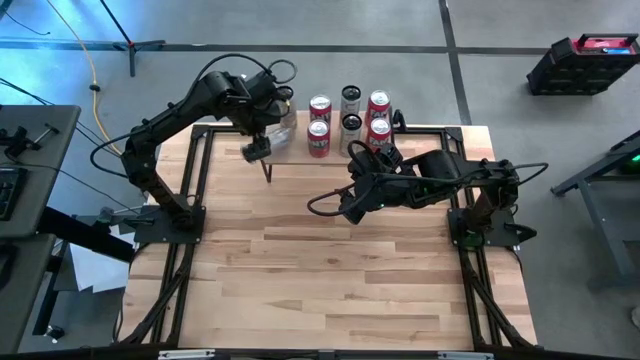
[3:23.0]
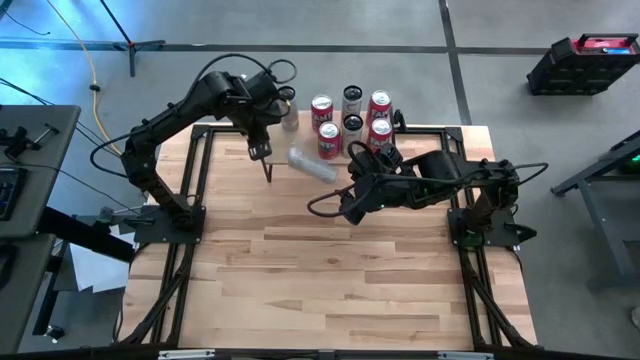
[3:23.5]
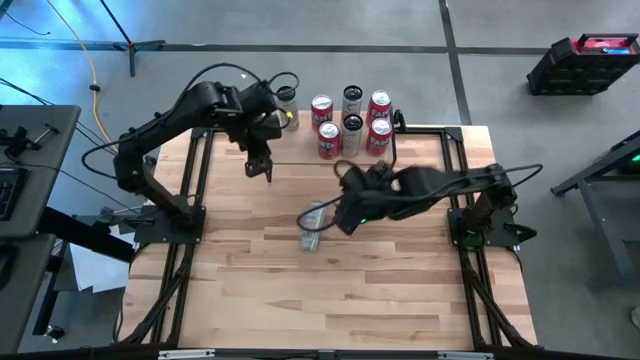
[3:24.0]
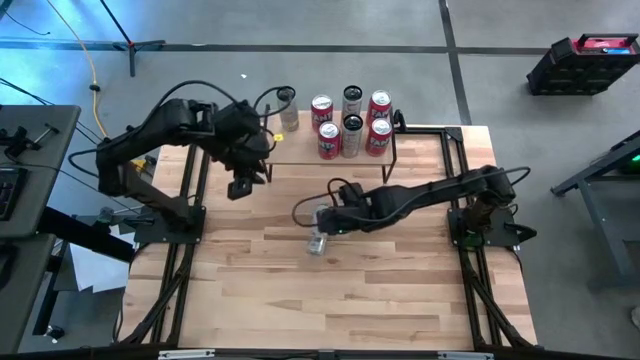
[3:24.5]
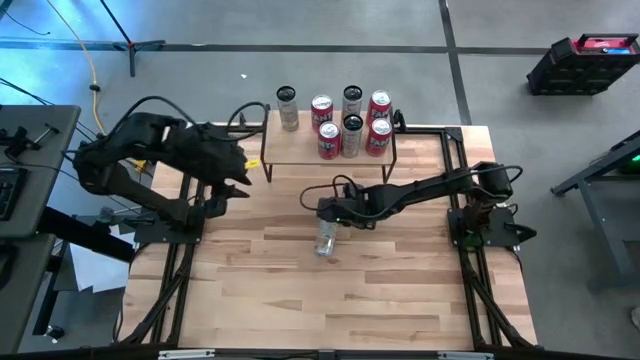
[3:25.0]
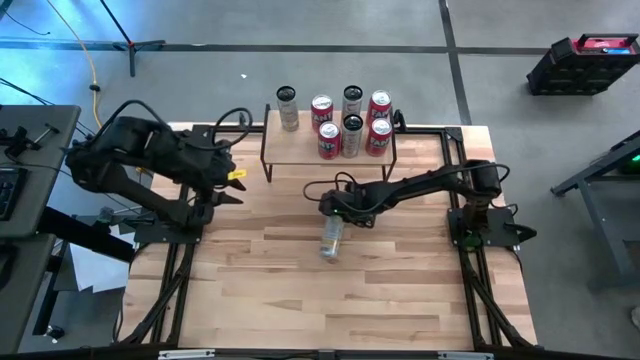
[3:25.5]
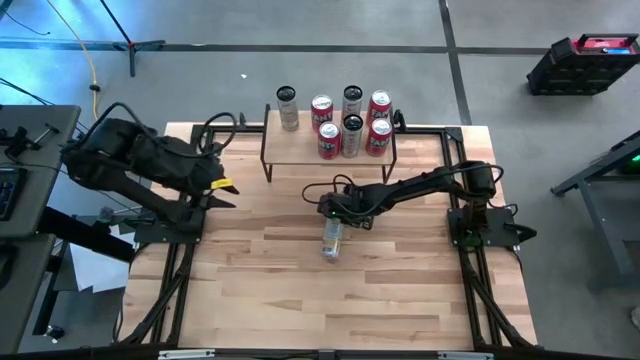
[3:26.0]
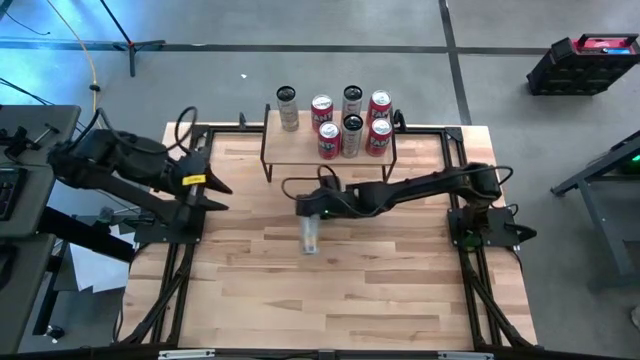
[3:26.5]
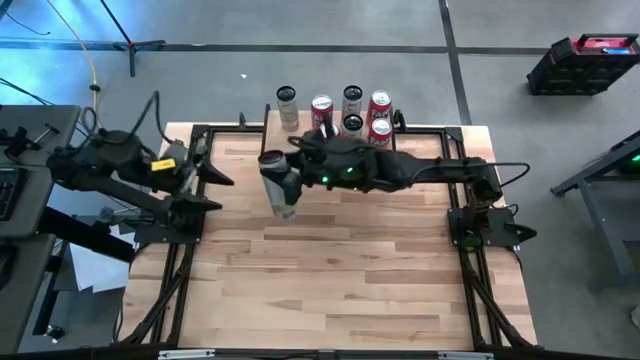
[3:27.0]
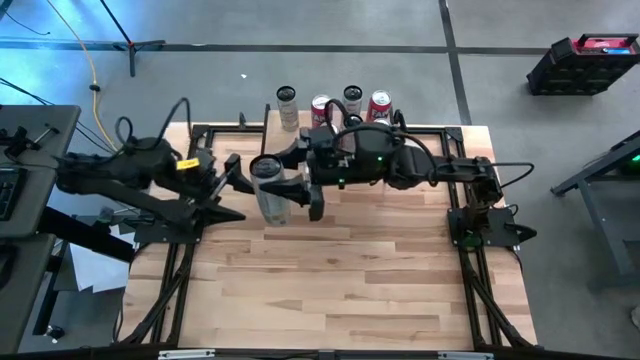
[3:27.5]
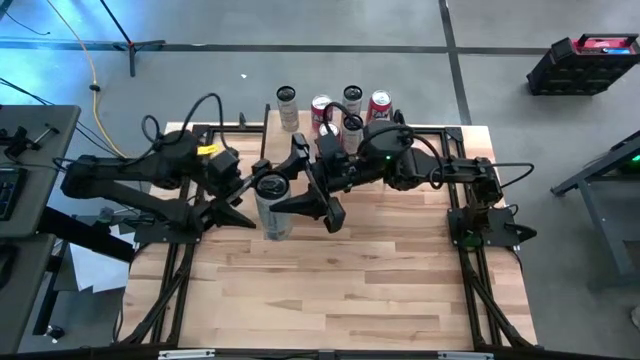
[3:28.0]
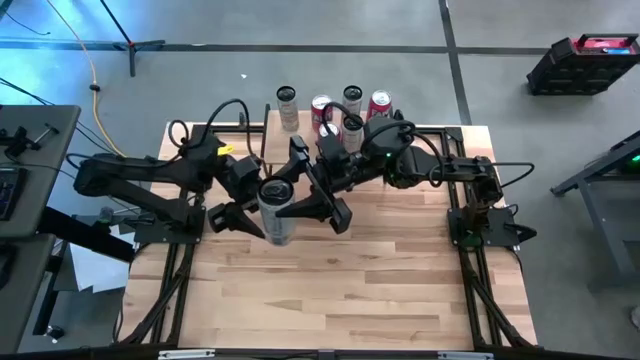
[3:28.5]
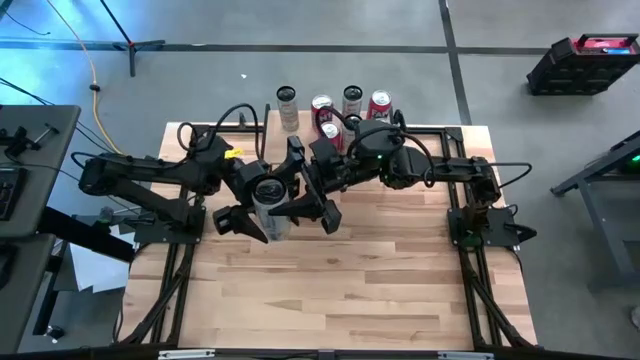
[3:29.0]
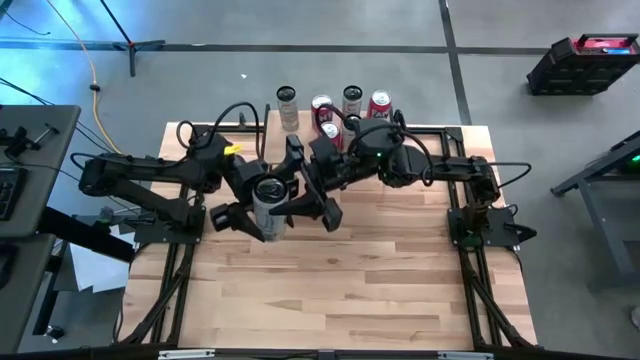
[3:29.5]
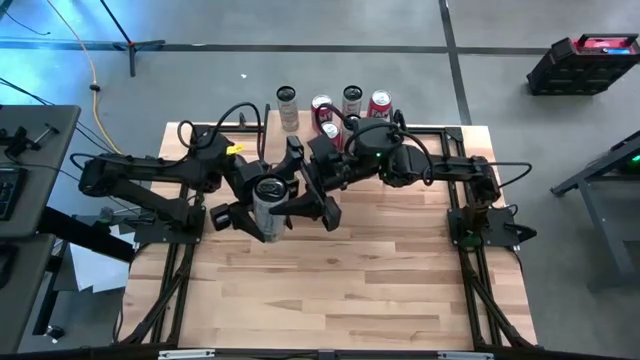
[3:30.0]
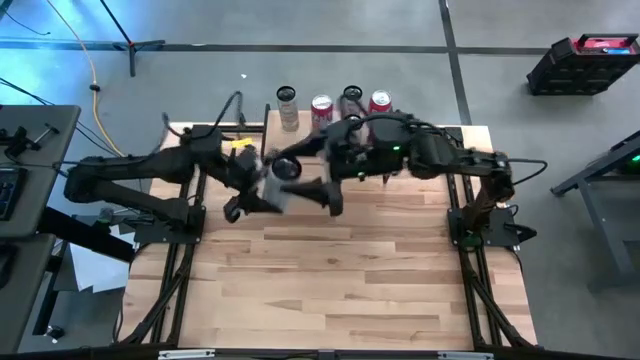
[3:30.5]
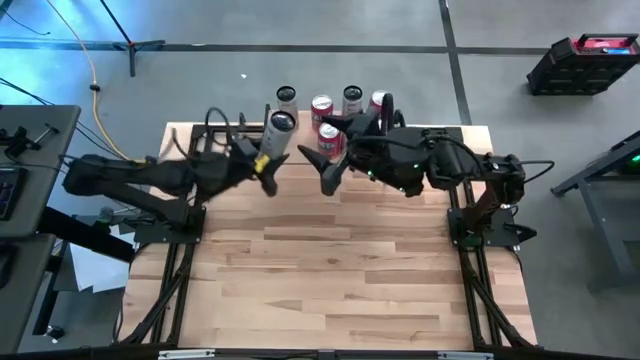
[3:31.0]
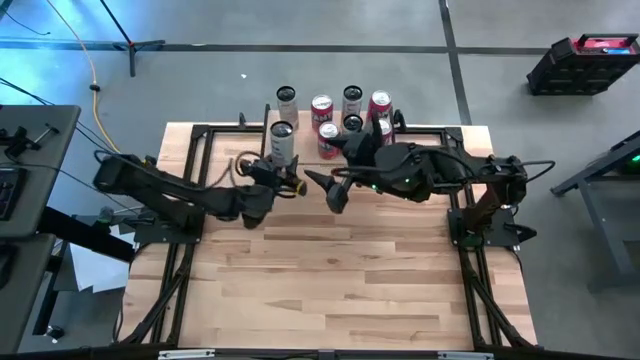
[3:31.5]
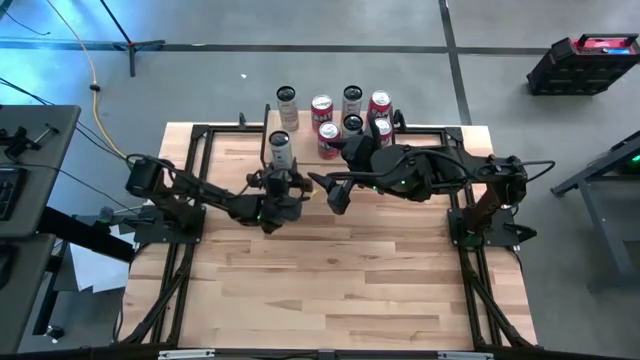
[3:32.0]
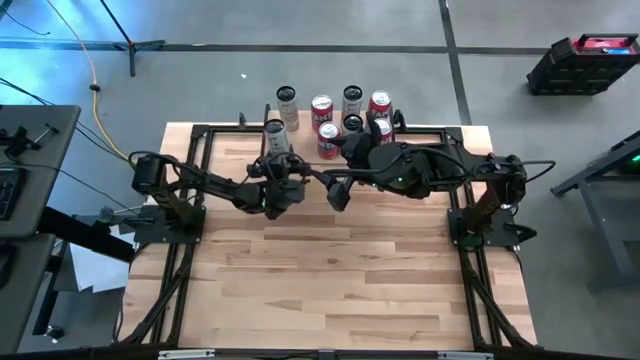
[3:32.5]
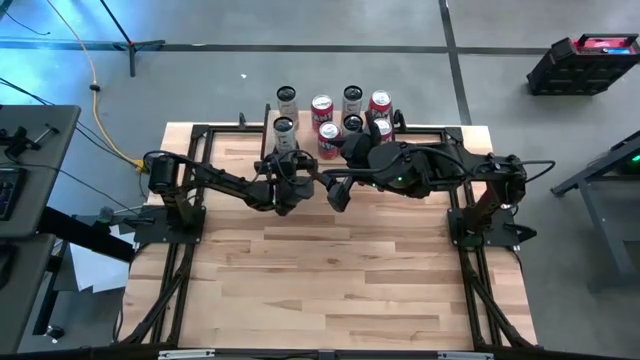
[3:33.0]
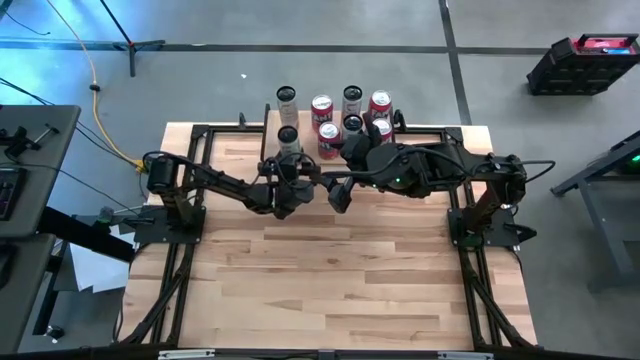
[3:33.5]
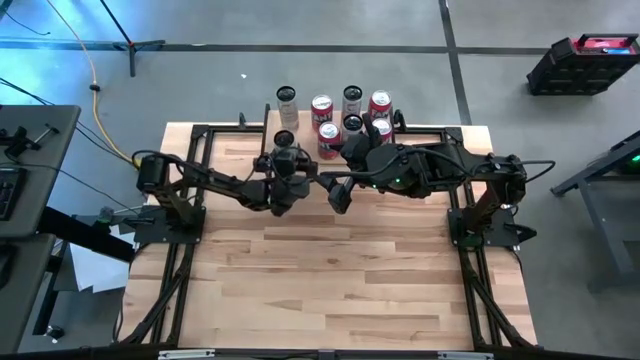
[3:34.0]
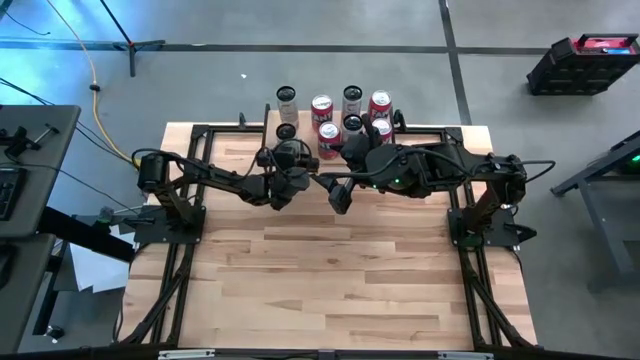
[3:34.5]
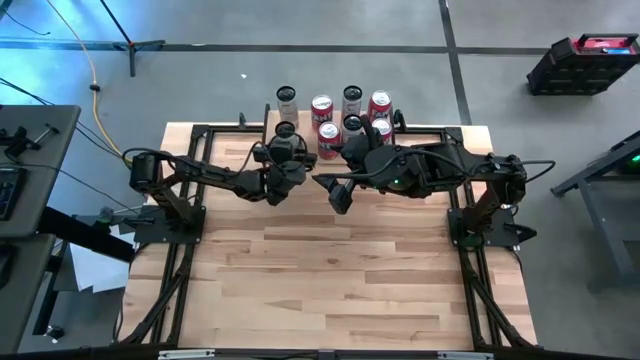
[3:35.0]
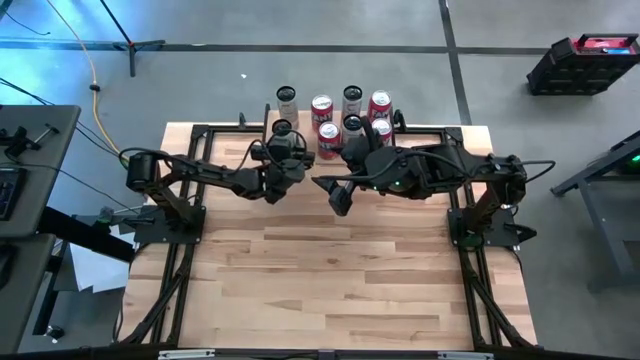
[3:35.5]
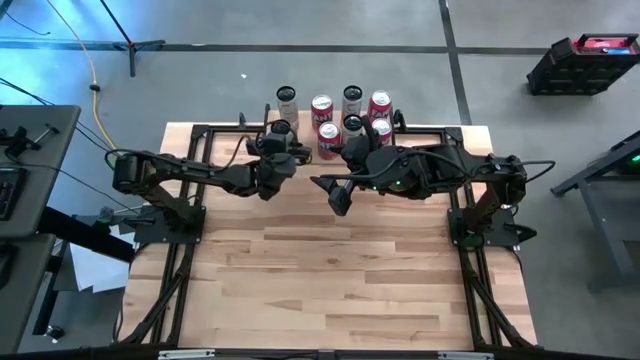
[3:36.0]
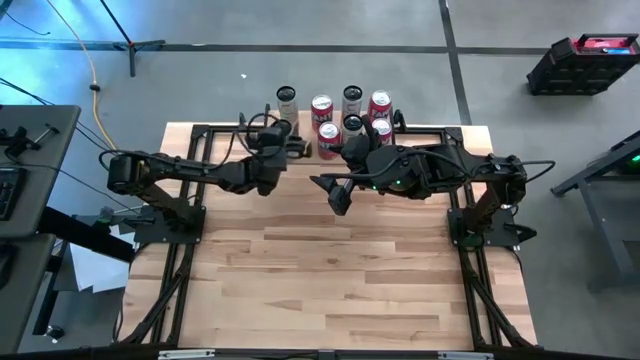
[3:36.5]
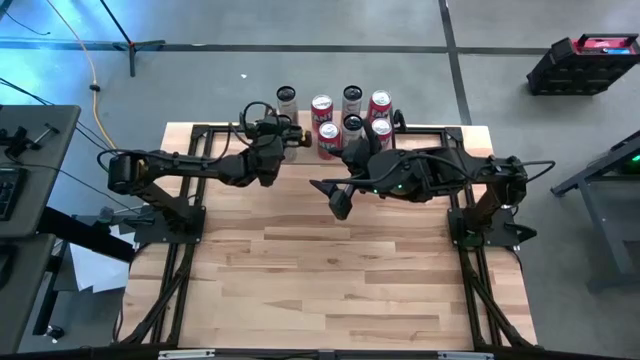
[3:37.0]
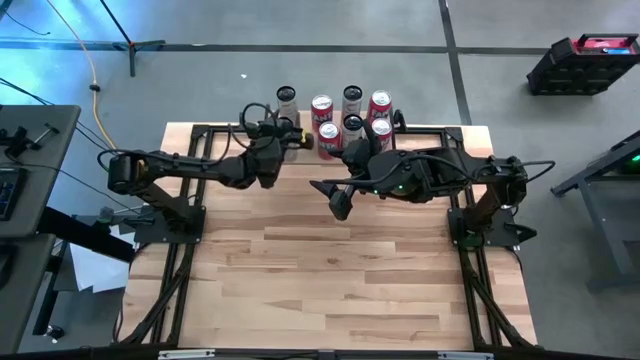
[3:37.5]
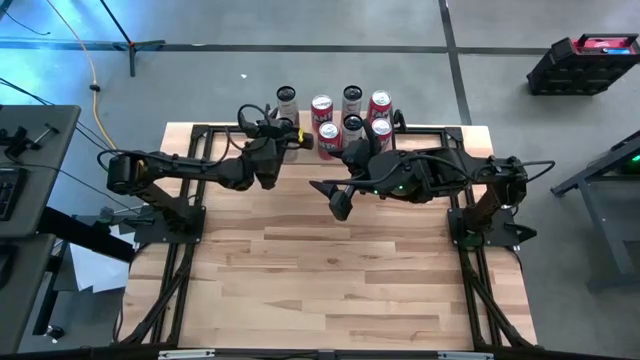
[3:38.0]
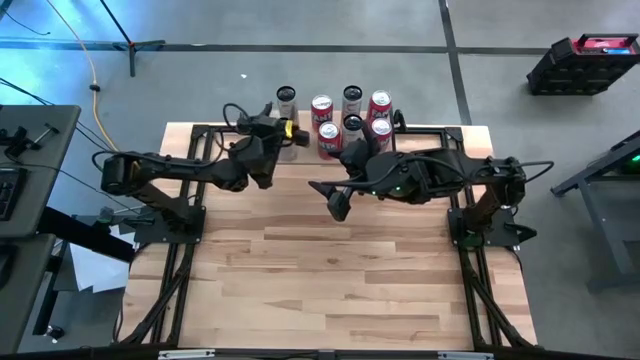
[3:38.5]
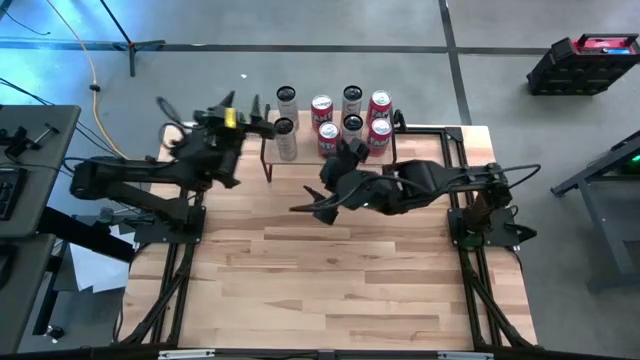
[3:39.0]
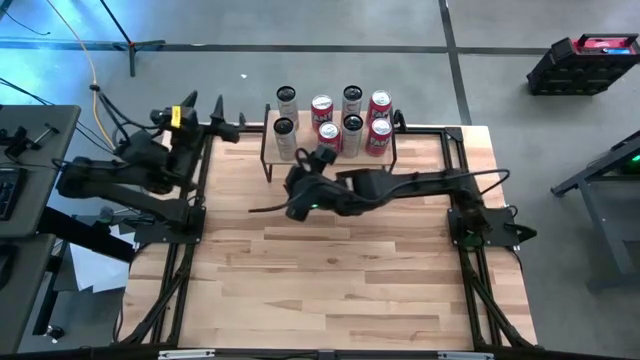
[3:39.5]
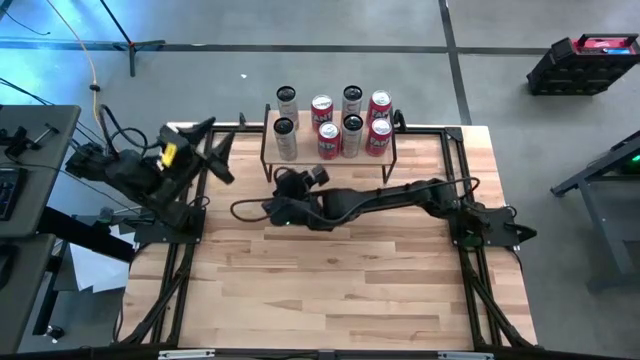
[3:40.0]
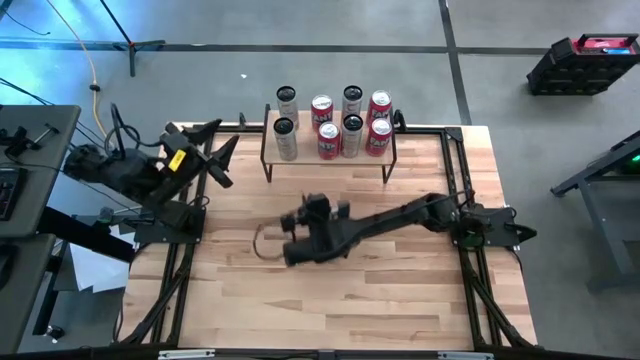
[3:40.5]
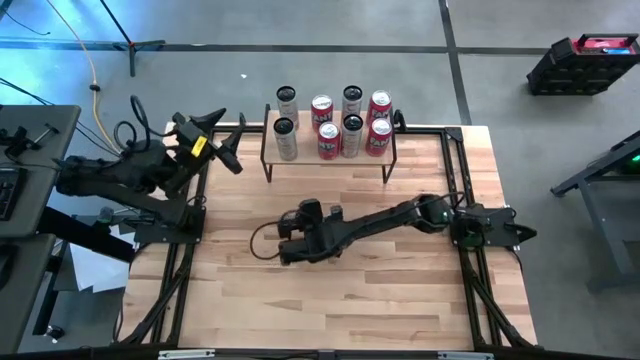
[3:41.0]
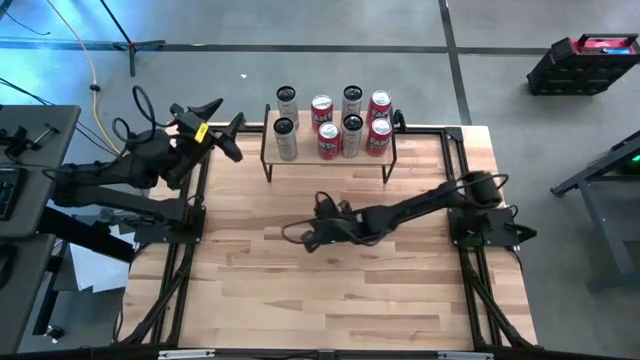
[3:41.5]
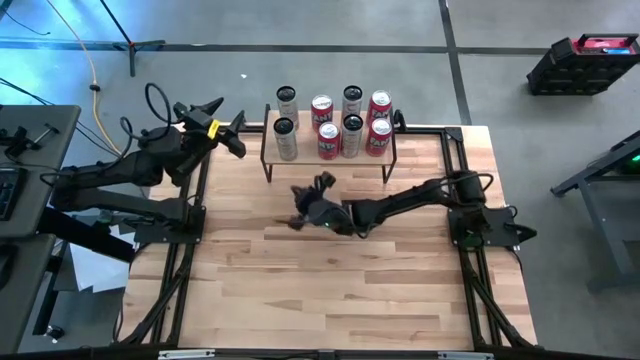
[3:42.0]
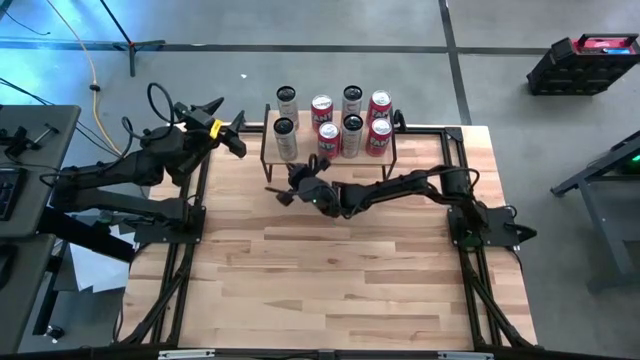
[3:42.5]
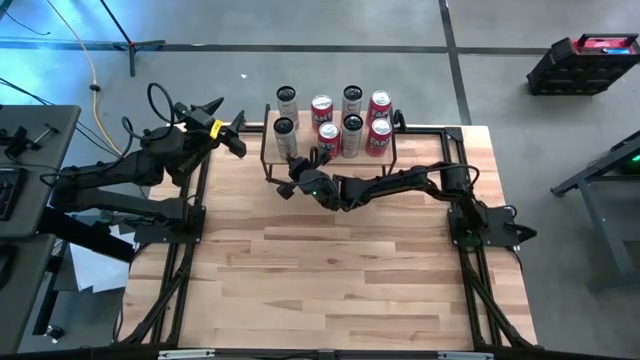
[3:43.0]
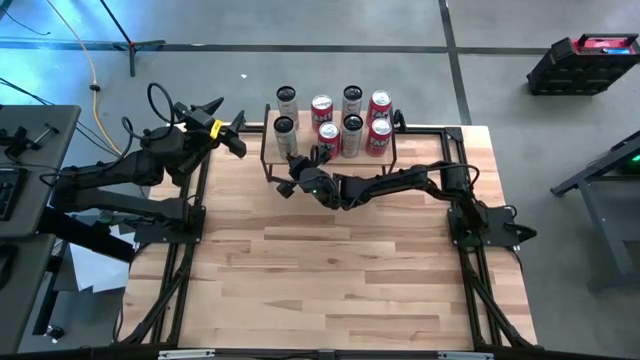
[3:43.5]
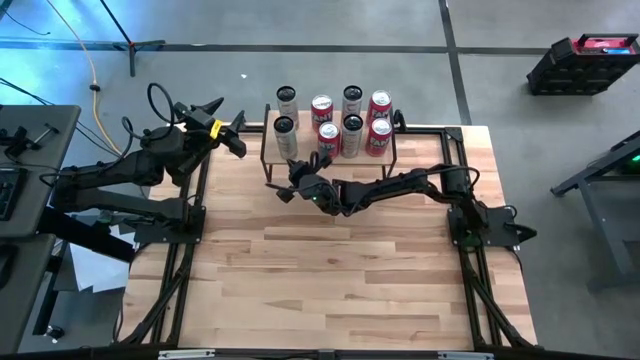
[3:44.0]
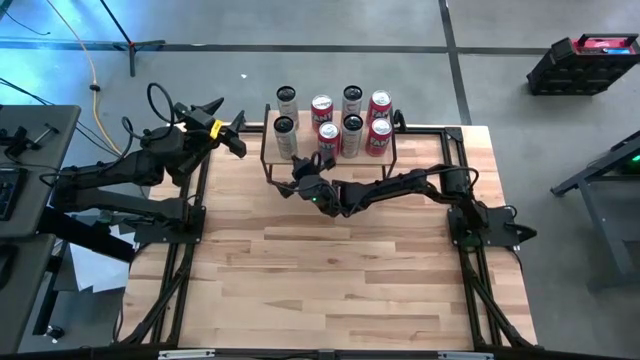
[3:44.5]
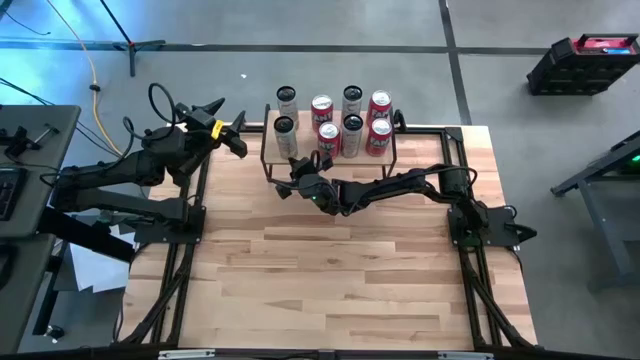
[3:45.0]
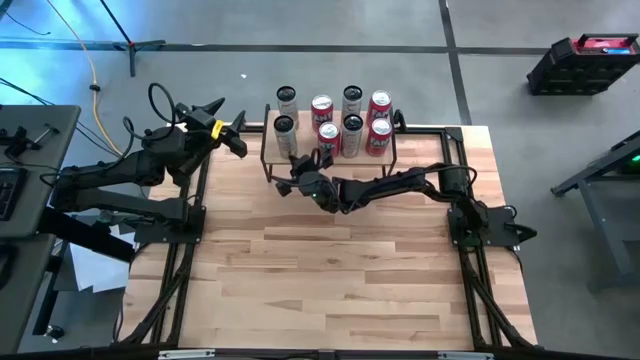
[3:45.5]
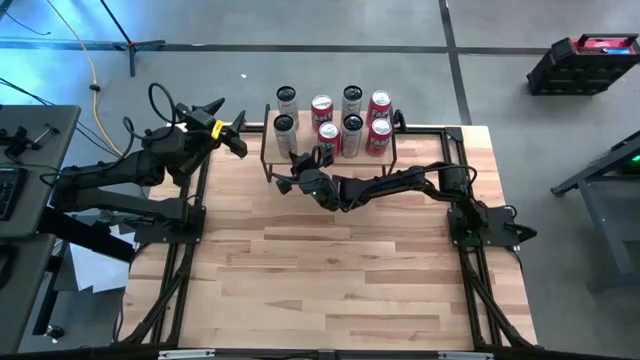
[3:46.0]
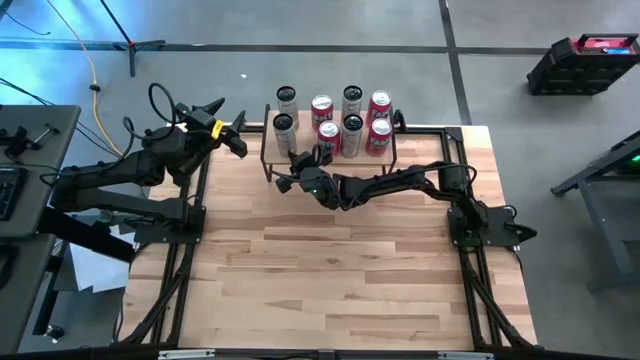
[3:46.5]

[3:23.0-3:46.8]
Task: Place canned beverage on shelf
Put the white soda can aligned with the other white soda can on the shelf
